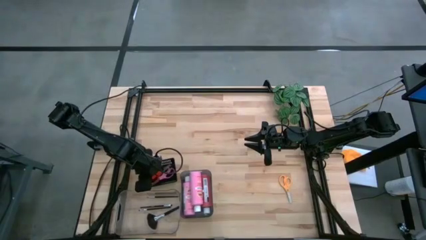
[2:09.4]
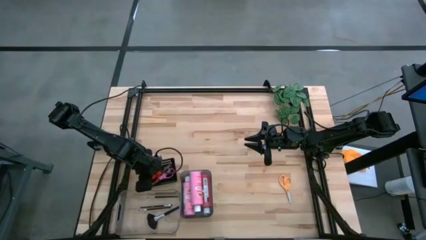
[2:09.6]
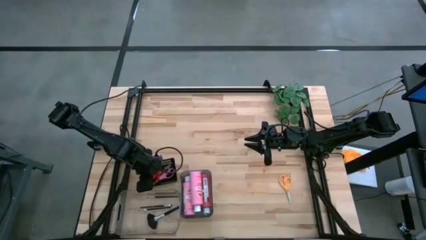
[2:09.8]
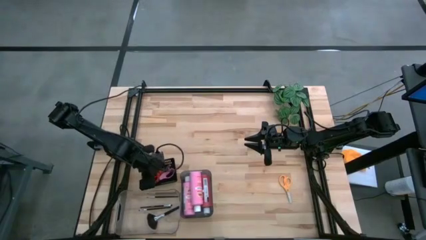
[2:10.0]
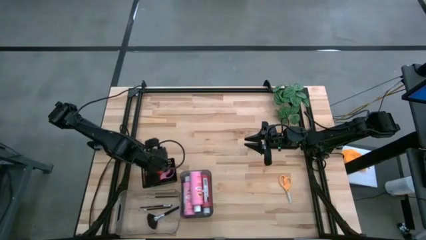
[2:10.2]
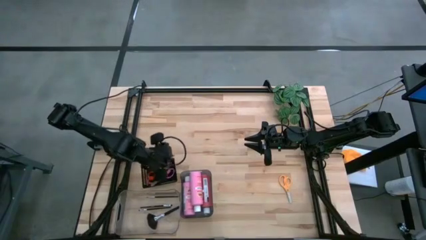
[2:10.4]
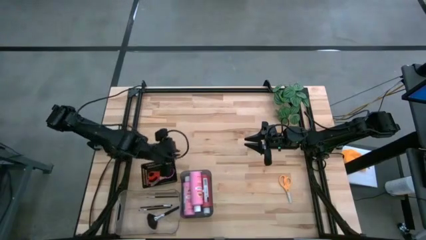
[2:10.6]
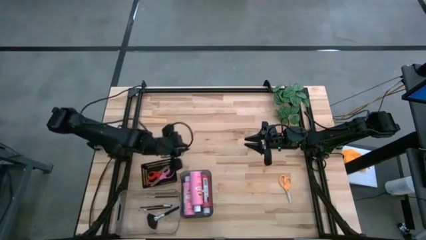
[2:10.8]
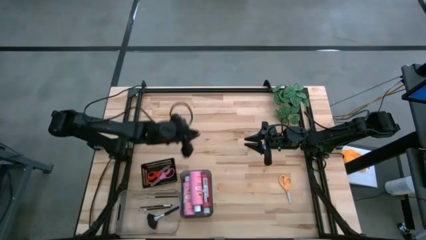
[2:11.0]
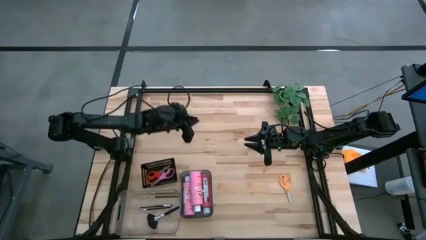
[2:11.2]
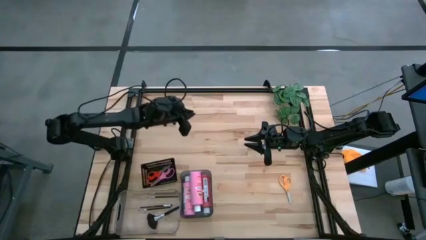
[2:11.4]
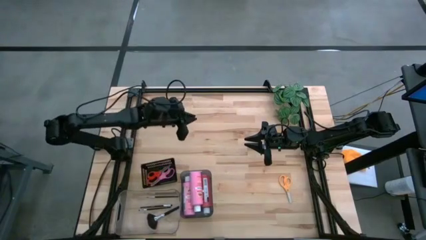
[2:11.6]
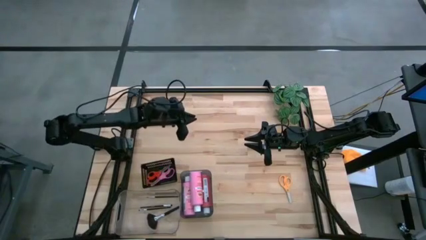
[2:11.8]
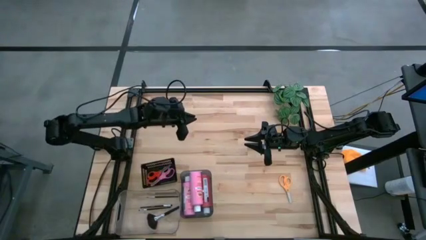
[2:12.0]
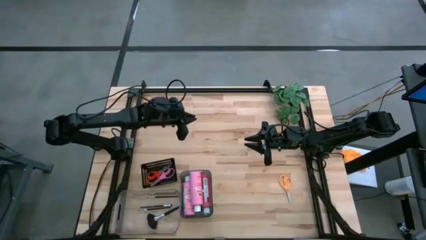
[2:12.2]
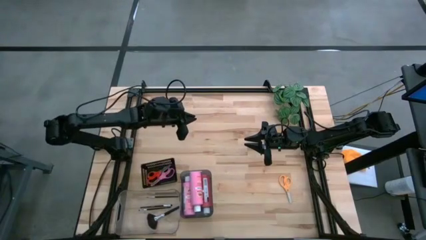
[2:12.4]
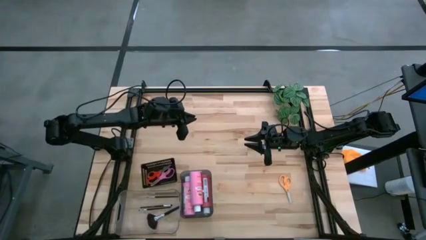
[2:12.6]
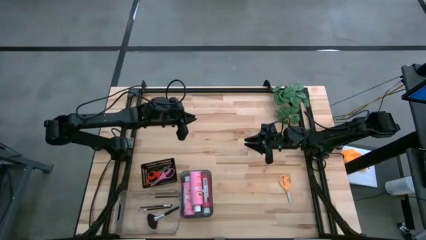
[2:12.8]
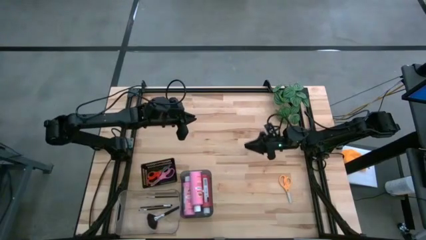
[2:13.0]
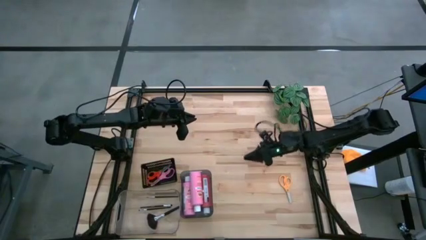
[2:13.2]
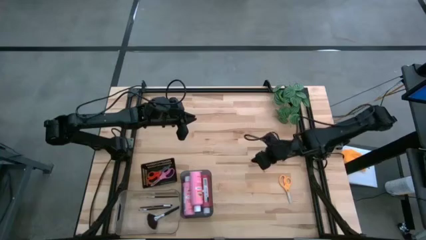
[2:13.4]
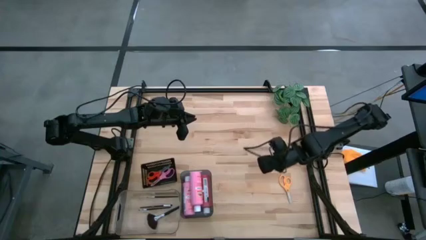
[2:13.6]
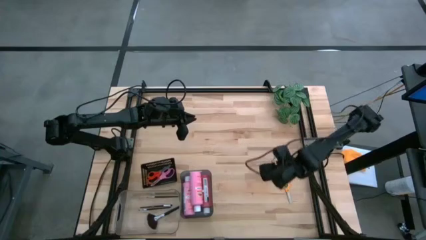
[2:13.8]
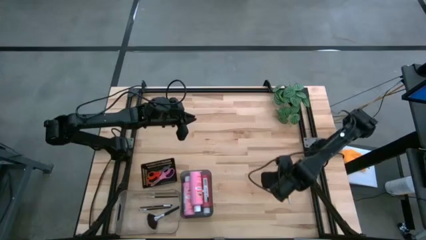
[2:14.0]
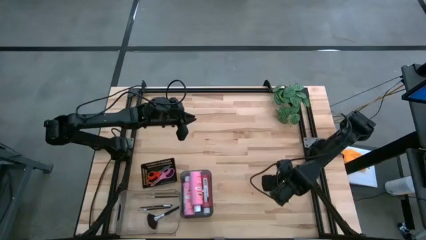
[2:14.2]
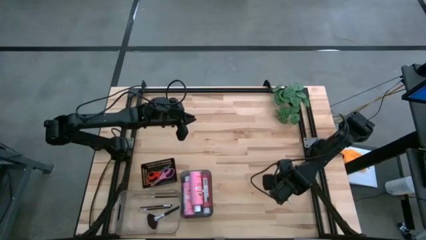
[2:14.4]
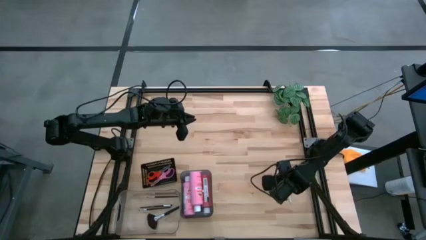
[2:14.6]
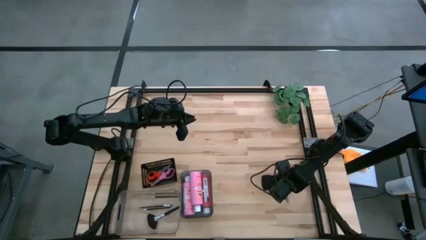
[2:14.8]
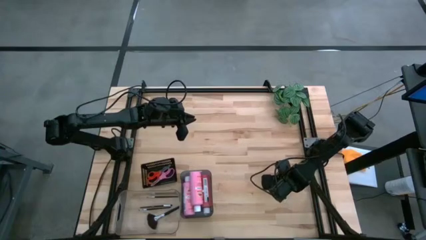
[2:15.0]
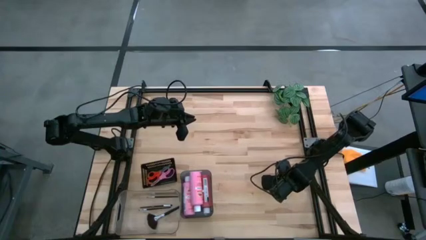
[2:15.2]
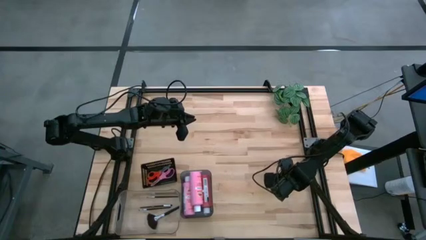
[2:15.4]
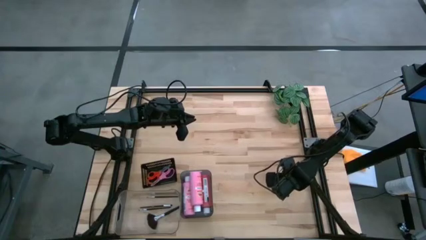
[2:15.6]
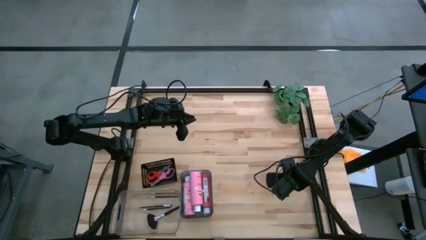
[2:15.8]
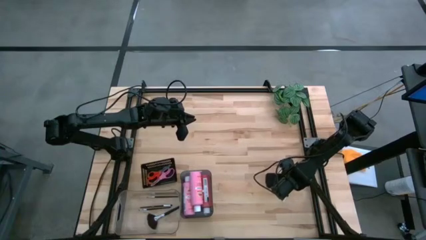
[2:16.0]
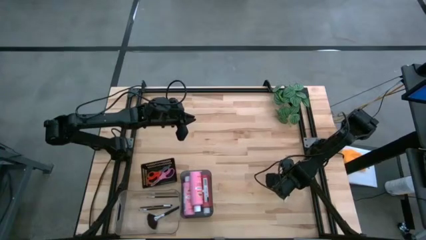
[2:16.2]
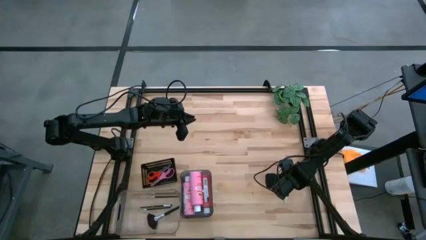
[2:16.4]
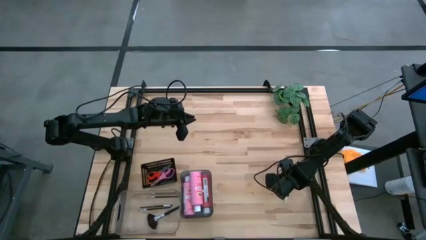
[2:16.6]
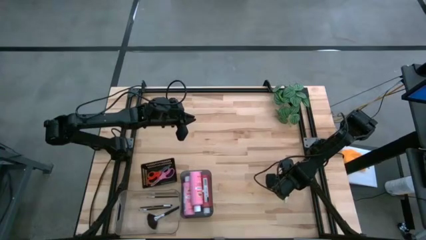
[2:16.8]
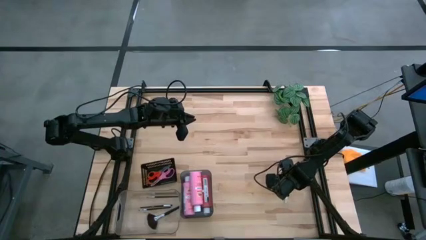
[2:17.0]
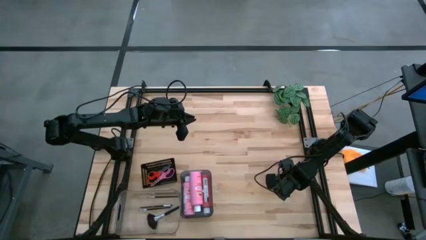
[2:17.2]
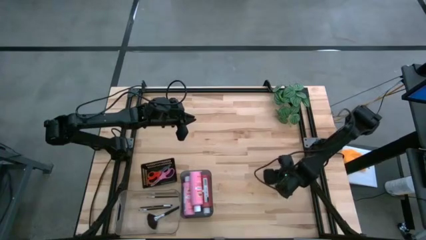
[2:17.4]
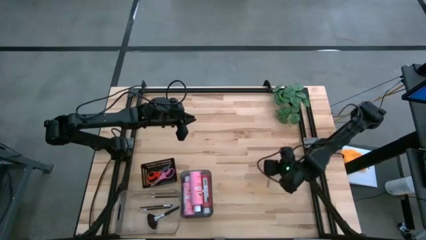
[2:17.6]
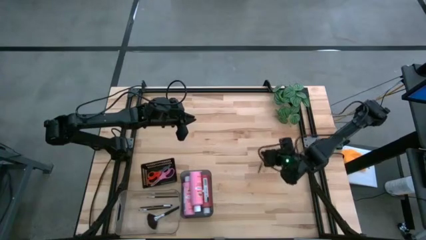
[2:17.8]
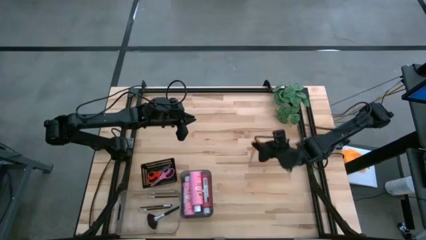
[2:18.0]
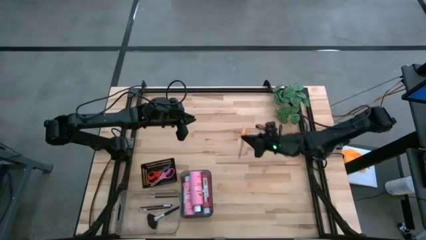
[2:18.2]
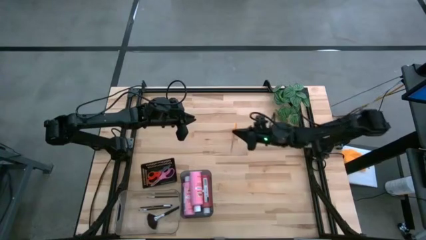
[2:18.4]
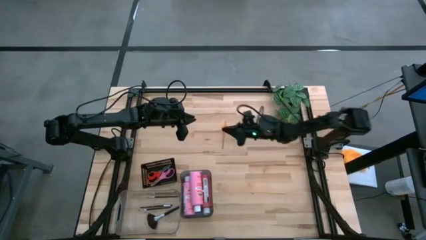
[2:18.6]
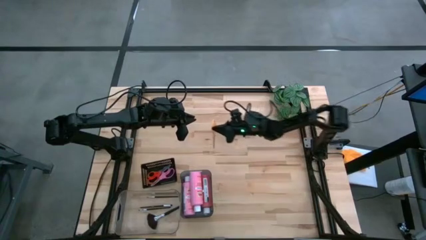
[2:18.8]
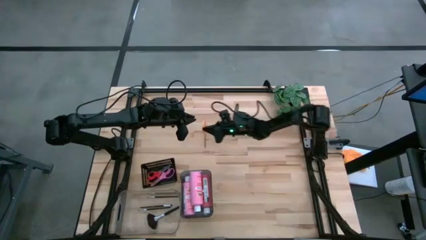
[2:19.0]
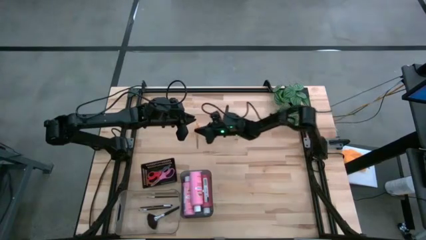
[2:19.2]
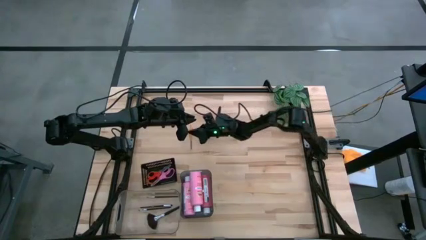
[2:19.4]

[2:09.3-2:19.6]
Task: Pick & Place Paint Supplies
Put the yellow scissors into the black bin

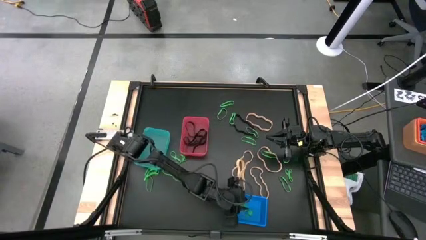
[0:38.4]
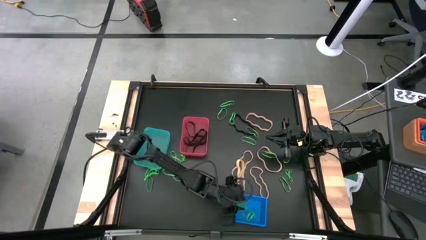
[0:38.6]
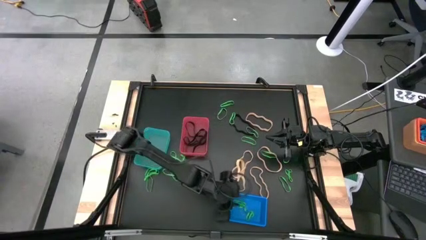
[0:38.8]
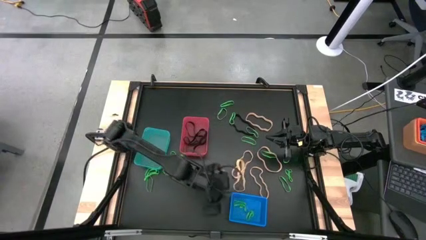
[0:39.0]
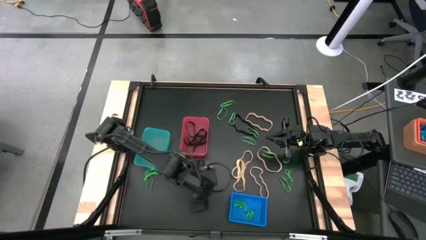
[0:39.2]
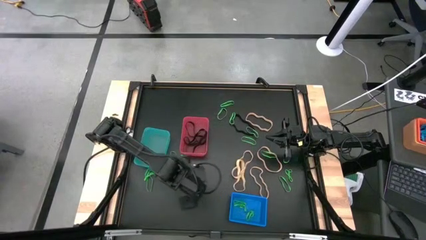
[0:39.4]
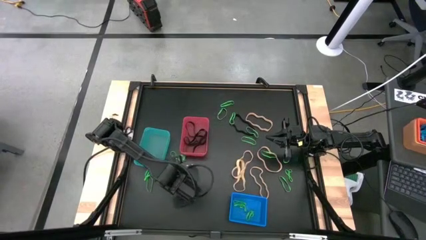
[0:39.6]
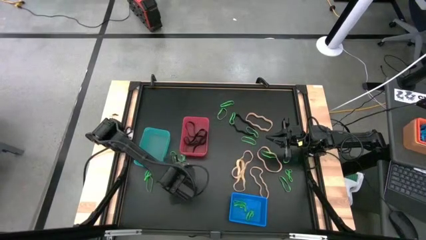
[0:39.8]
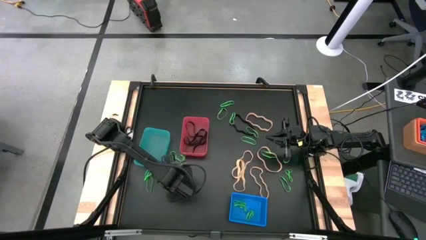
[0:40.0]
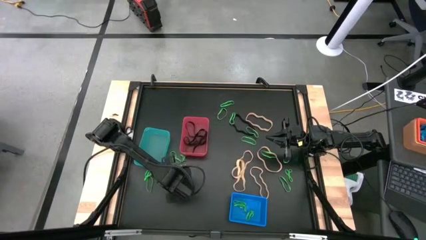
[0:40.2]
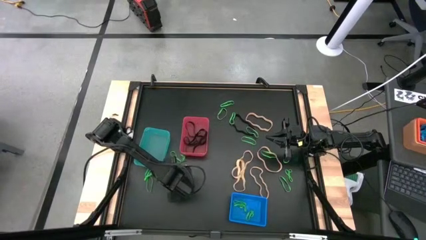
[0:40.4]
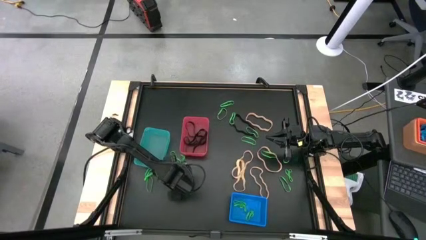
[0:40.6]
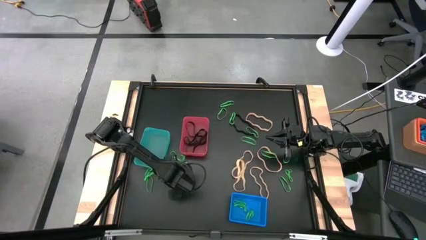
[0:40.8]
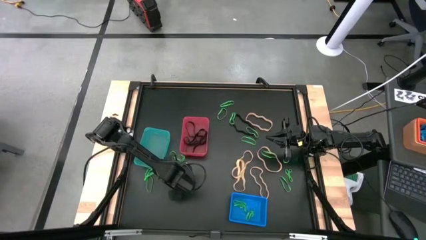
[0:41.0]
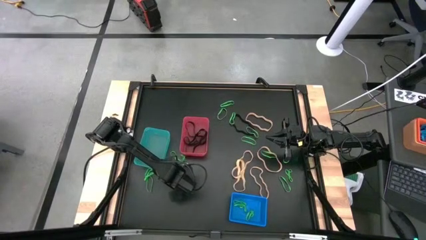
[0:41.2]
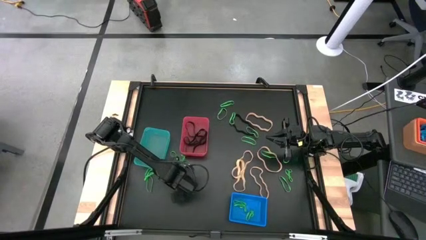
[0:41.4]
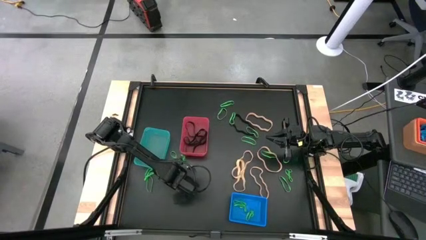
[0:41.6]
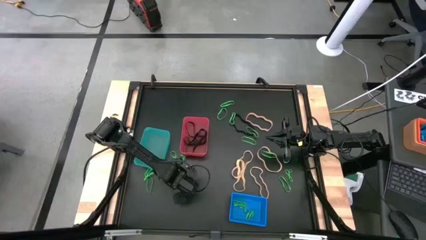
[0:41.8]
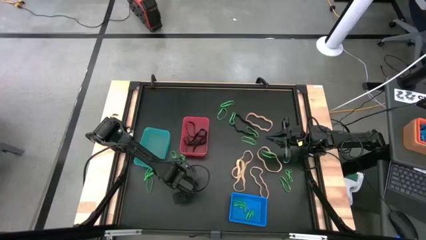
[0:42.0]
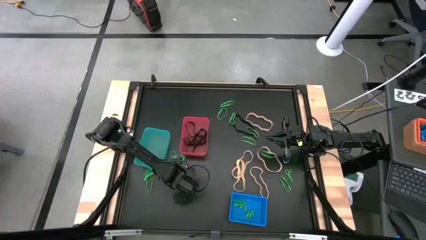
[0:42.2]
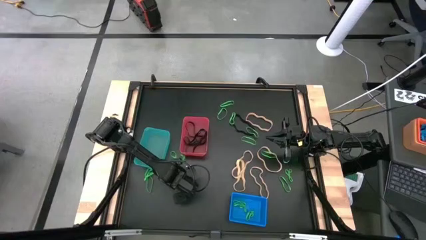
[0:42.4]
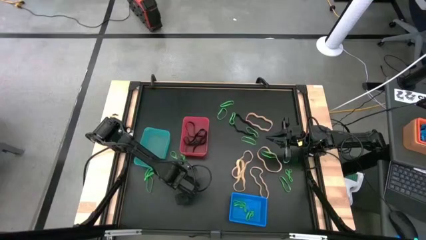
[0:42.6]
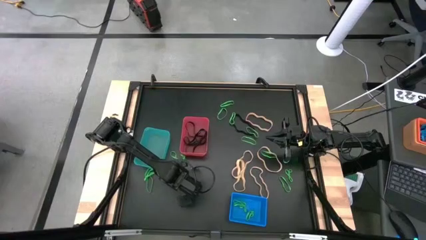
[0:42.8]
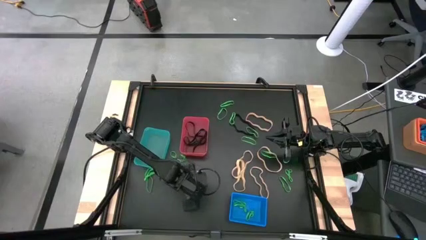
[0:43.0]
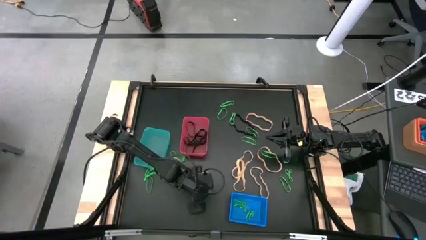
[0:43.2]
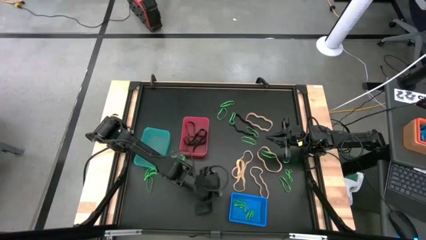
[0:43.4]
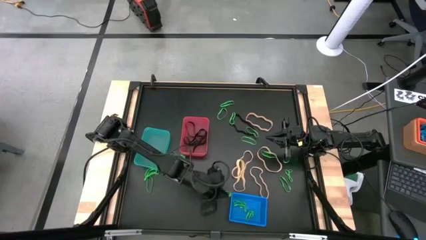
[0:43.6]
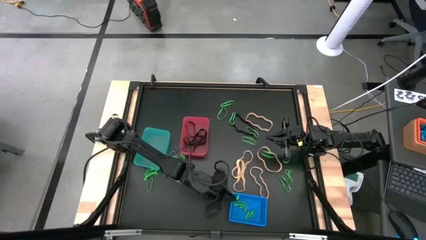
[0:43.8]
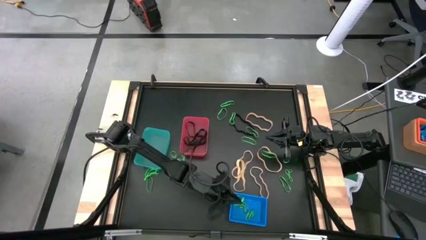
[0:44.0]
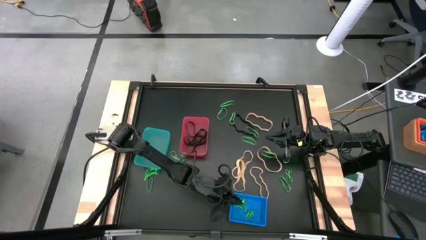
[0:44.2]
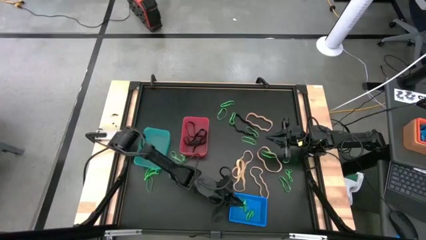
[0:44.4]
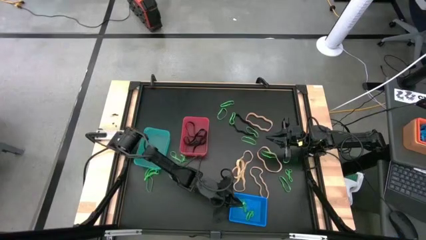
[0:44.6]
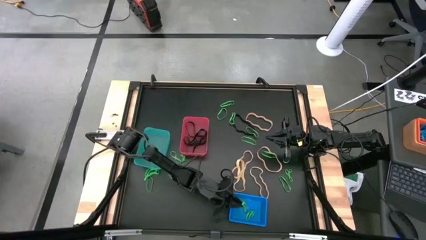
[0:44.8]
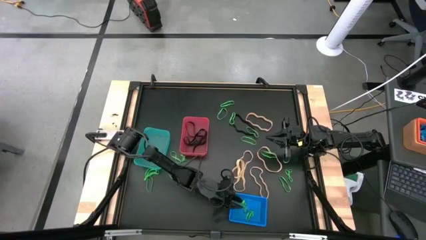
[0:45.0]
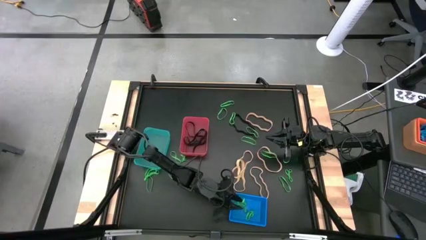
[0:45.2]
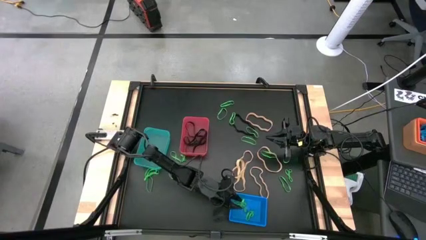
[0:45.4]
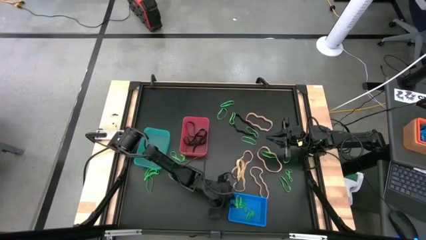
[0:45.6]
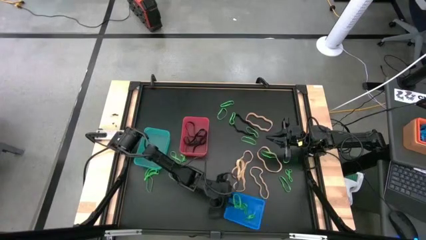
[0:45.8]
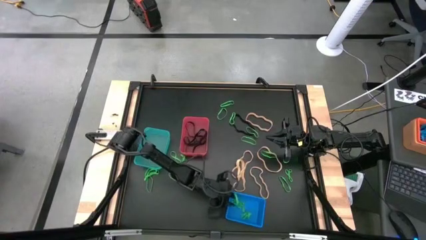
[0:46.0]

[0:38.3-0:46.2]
Task: Sort rubber bands into baskets
Put the green rubber band into the blue bin
